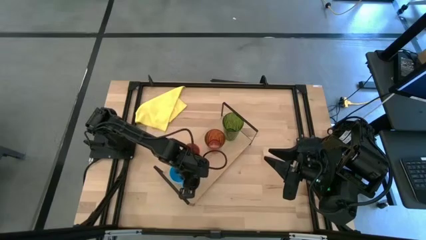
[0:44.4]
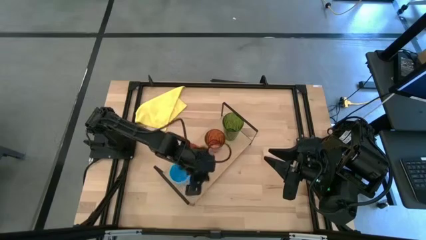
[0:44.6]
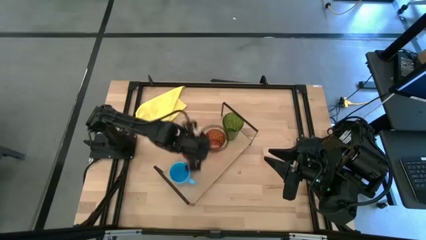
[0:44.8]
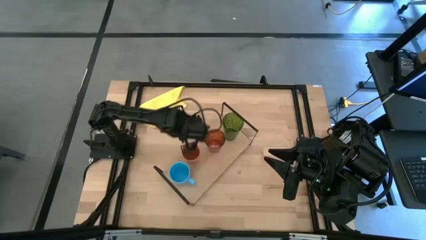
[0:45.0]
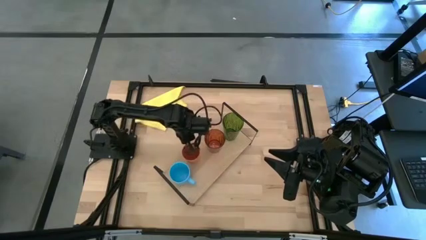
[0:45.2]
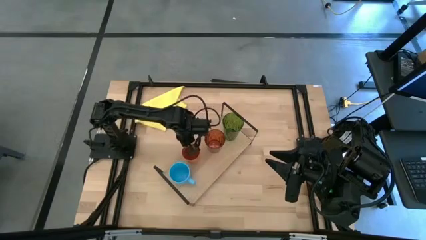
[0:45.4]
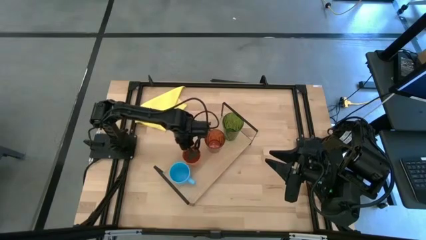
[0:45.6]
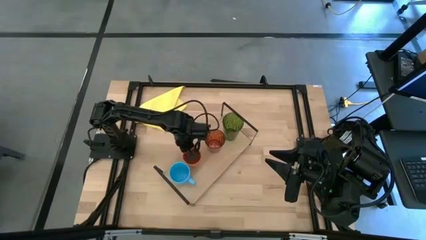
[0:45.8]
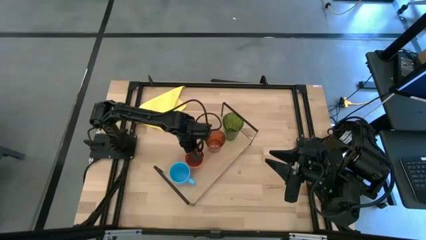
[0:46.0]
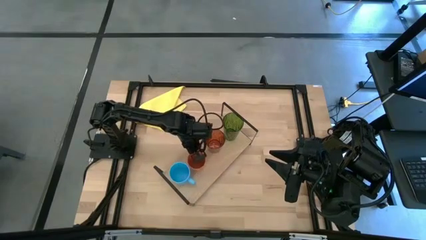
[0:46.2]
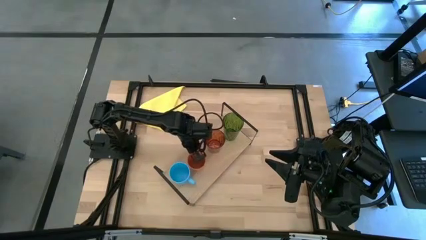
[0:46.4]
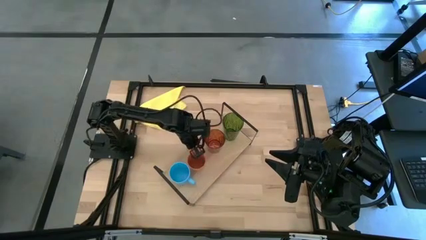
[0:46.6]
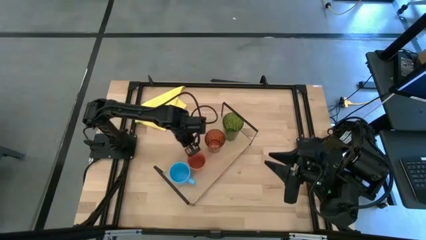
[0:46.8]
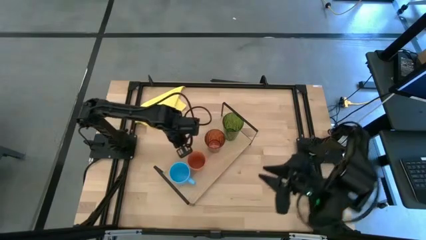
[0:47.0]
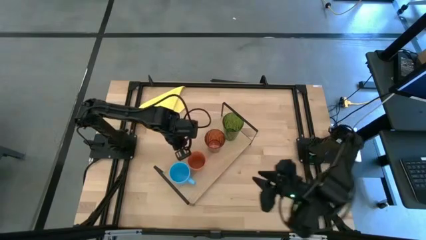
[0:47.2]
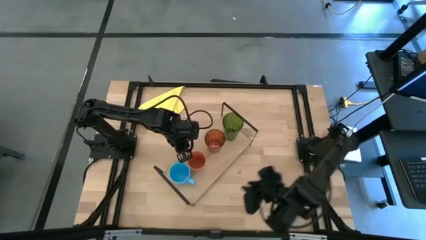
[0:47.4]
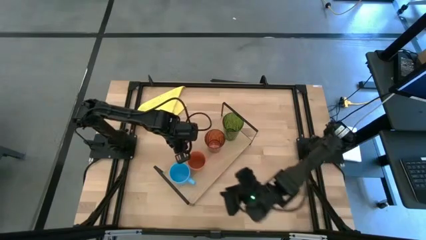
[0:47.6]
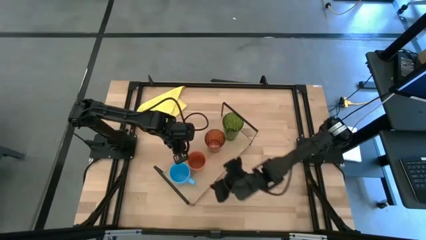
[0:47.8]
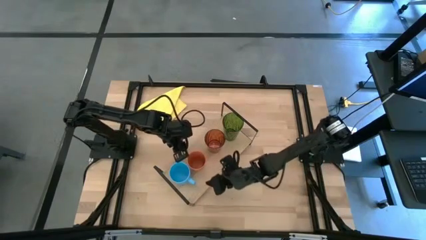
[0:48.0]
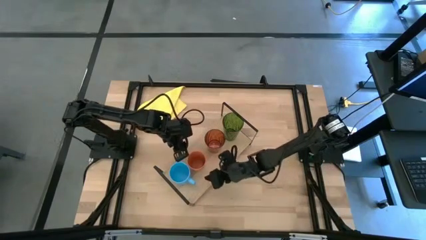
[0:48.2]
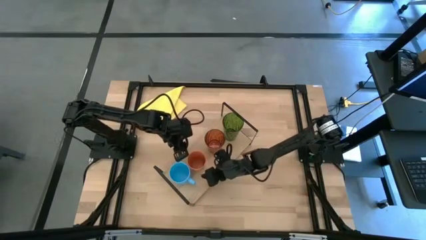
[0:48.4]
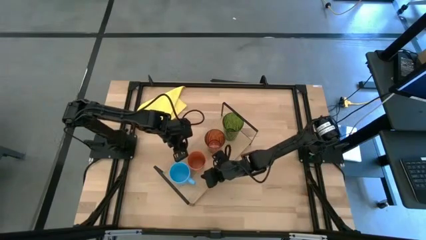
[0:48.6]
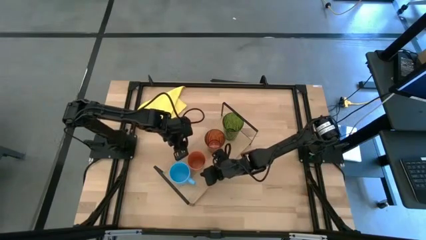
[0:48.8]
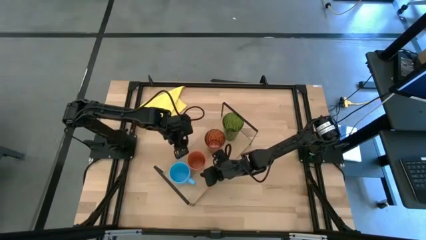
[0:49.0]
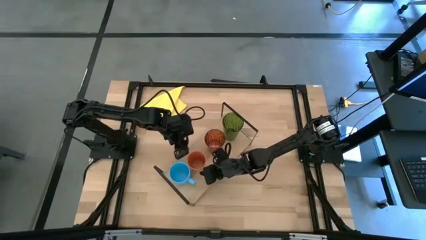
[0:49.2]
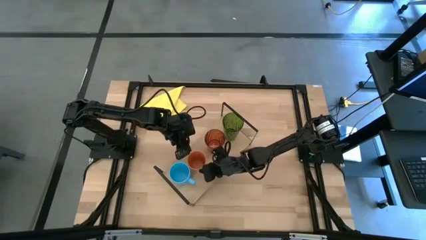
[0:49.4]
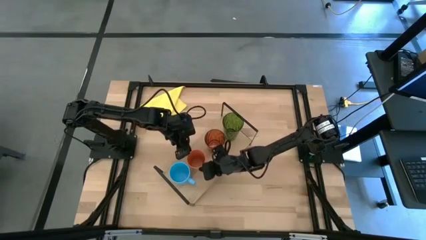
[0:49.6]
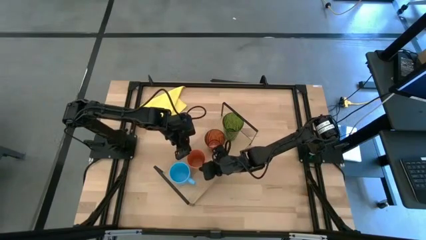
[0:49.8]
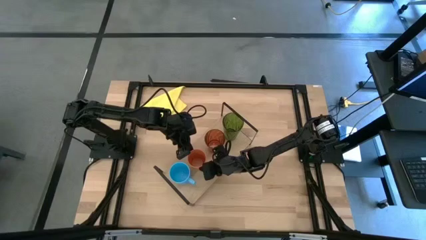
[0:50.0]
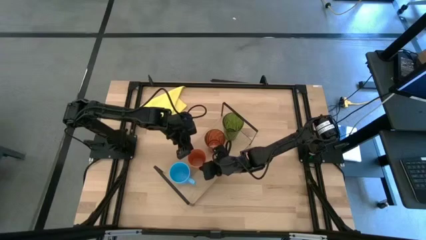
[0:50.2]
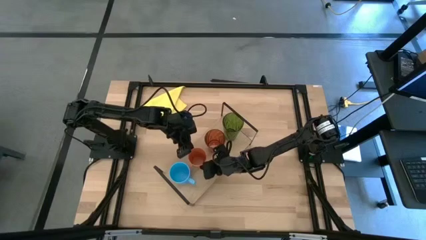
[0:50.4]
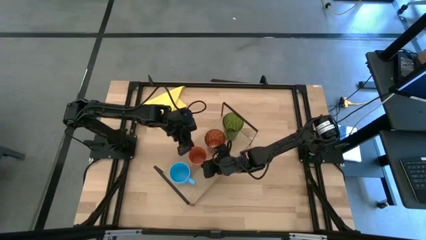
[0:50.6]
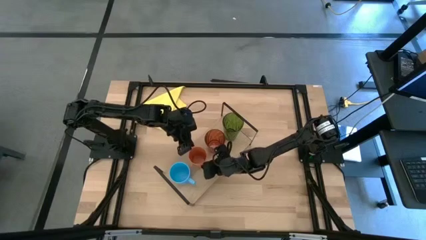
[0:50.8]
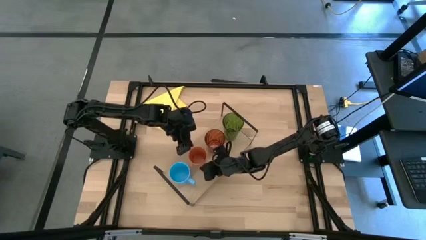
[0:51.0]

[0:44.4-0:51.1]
Task: Stack small to large cups/mugs on shelf
Adjust the orange cup on the shelf

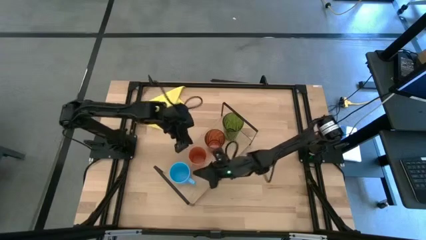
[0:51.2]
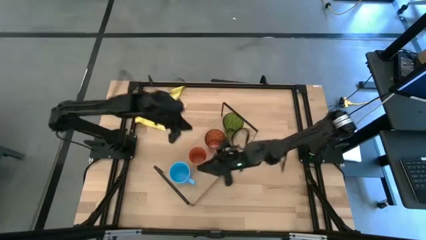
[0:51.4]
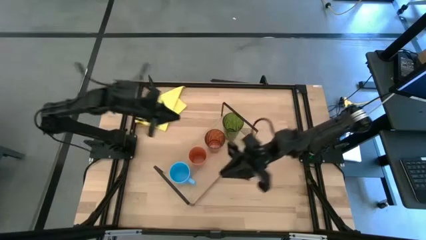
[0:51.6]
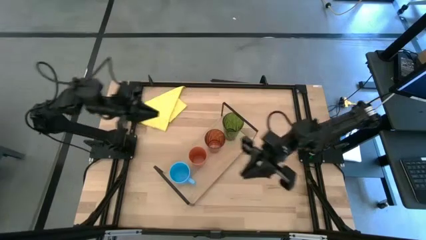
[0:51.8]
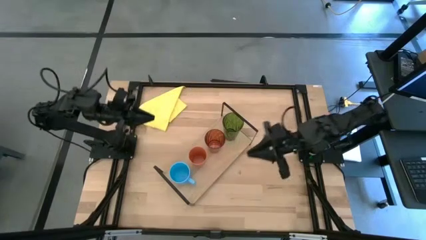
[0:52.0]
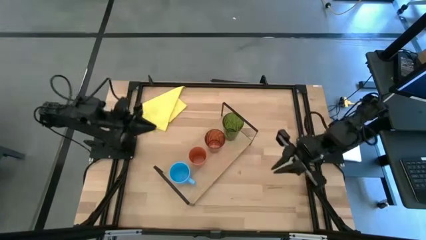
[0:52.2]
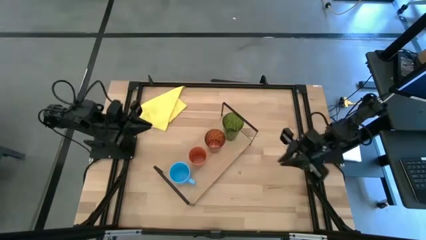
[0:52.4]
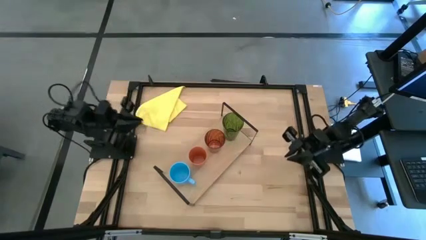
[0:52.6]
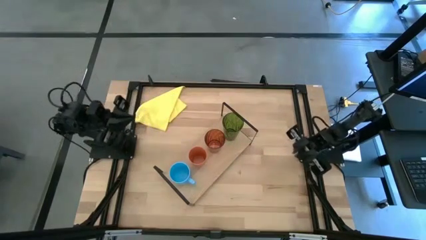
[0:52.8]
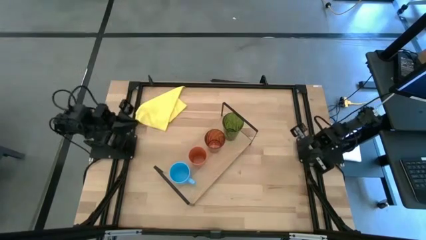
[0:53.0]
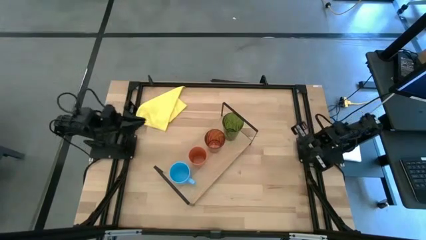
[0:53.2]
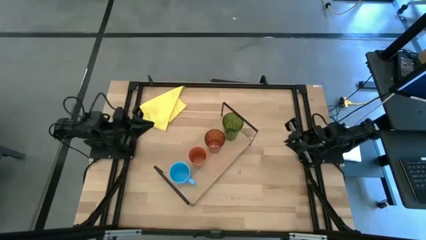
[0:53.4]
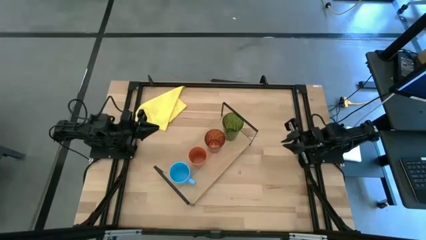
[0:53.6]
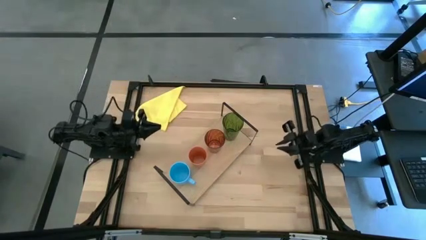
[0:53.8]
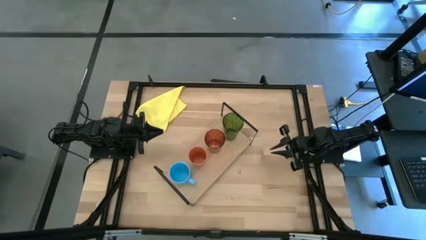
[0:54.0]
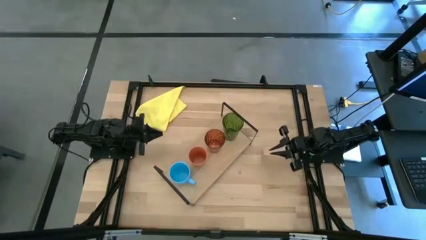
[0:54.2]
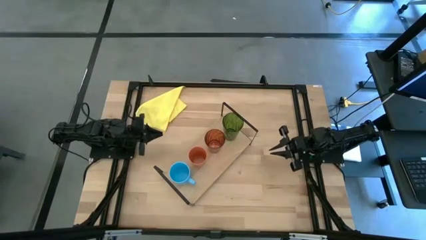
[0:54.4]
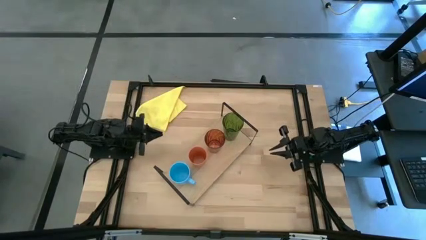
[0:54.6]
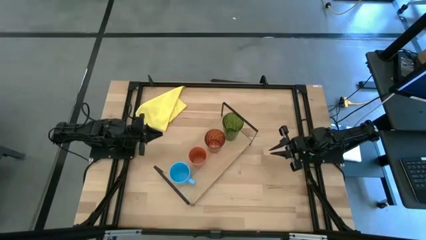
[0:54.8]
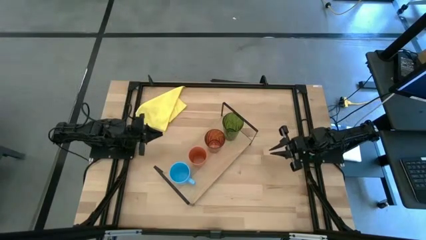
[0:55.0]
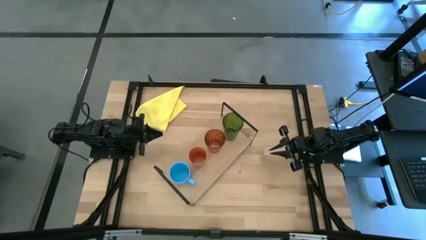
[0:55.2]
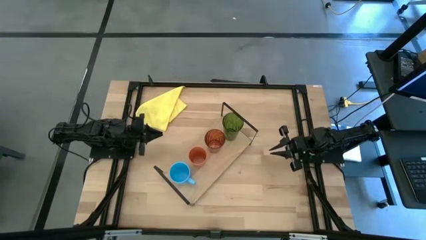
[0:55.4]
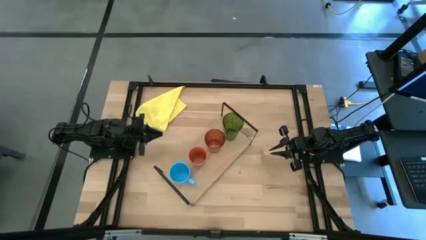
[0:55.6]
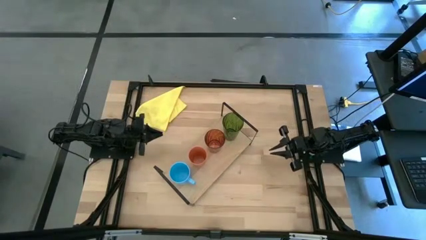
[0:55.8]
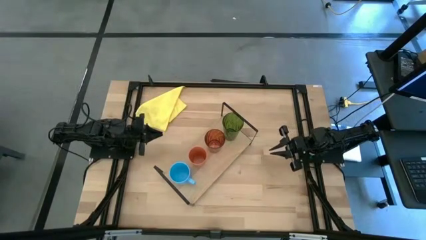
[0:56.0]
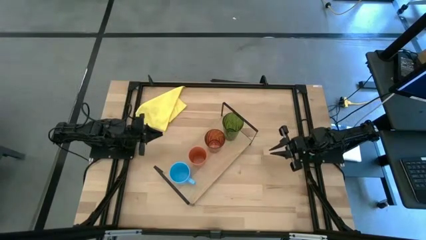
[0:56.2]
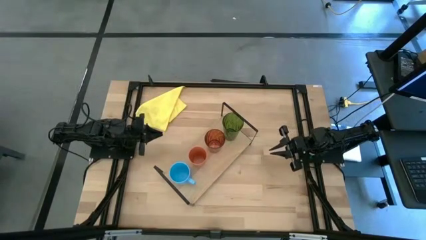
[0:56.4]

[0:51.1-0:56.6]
Return to Home Position

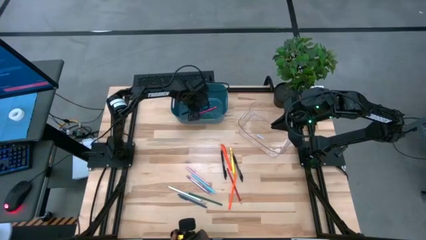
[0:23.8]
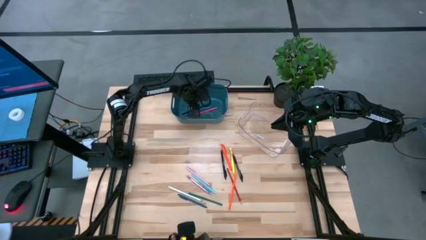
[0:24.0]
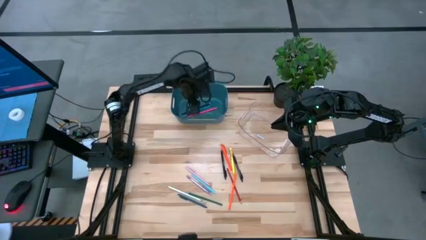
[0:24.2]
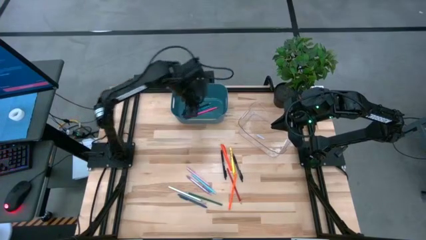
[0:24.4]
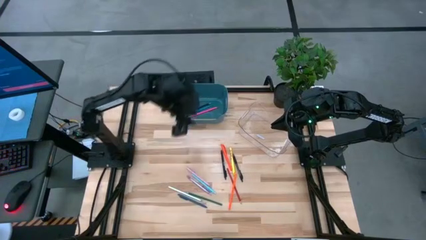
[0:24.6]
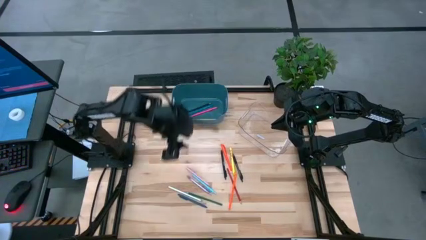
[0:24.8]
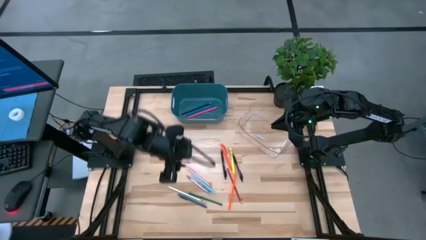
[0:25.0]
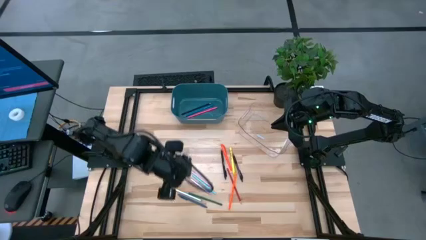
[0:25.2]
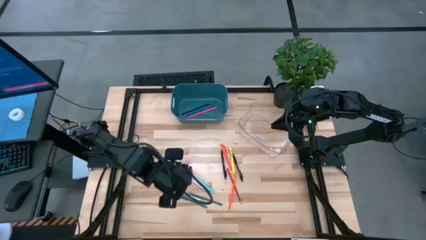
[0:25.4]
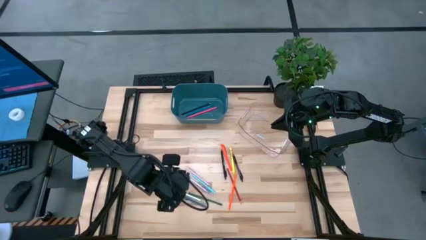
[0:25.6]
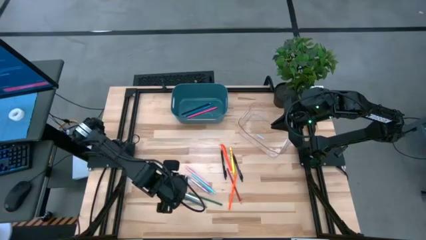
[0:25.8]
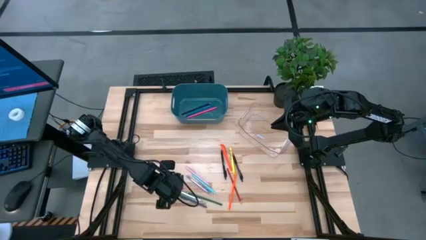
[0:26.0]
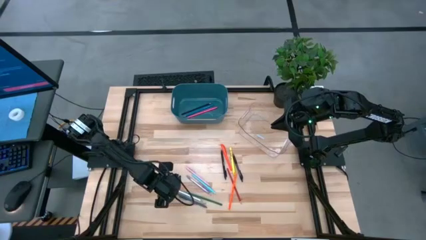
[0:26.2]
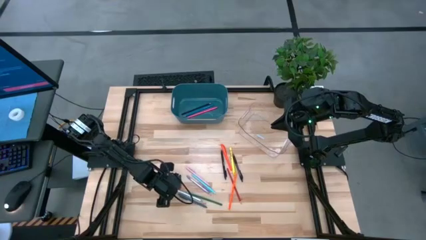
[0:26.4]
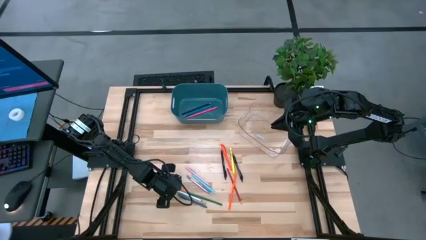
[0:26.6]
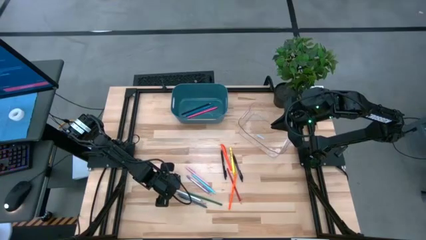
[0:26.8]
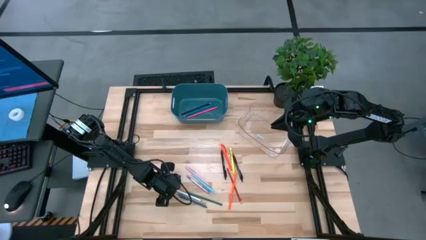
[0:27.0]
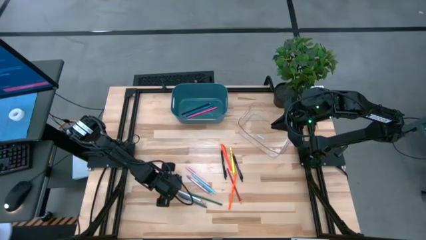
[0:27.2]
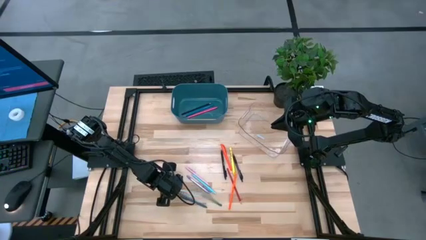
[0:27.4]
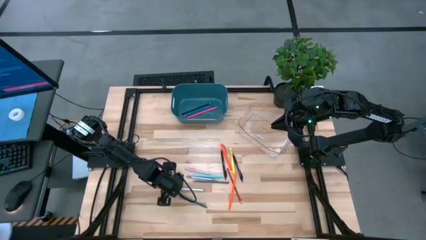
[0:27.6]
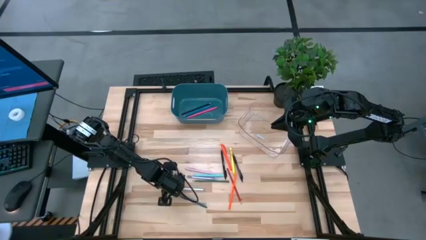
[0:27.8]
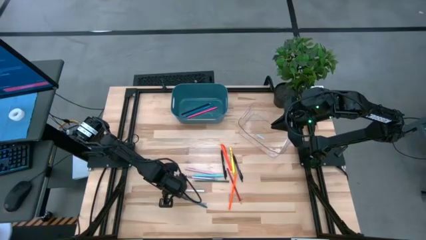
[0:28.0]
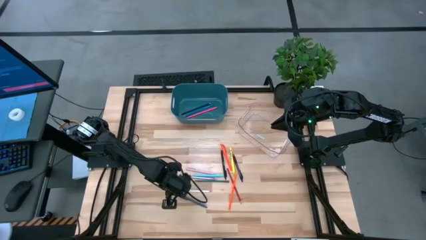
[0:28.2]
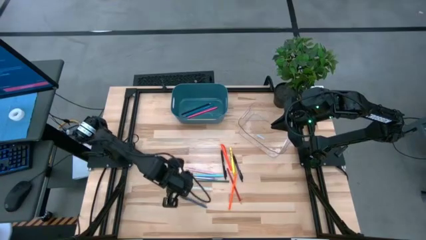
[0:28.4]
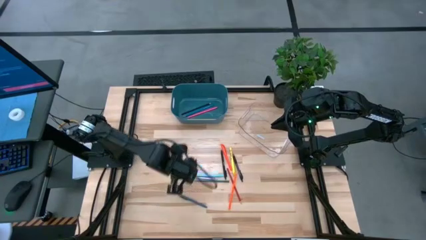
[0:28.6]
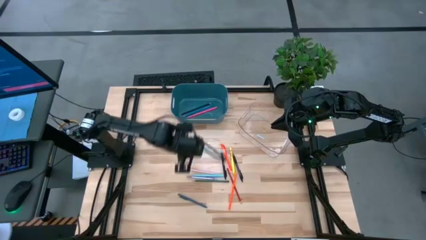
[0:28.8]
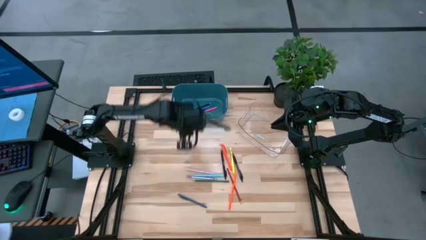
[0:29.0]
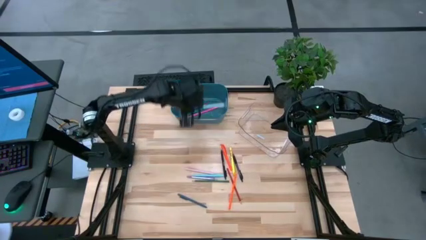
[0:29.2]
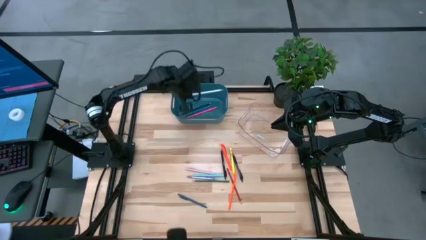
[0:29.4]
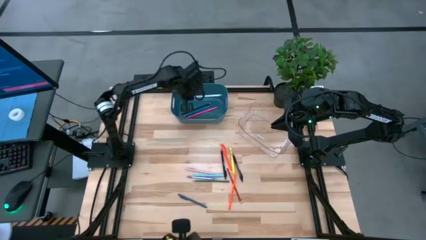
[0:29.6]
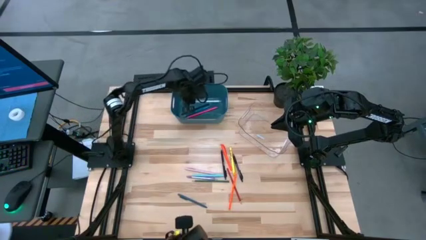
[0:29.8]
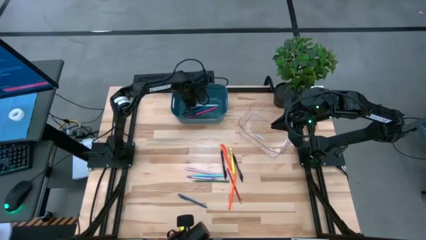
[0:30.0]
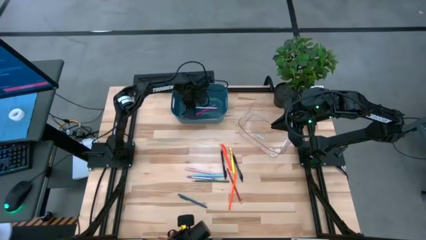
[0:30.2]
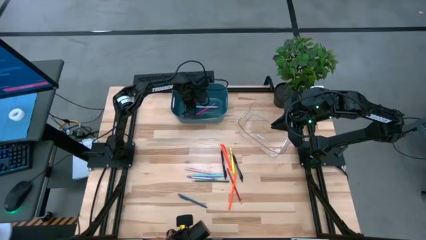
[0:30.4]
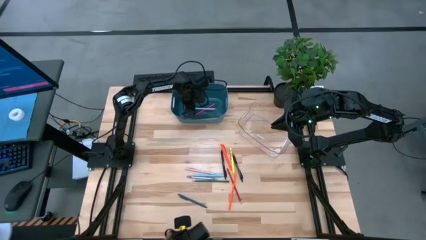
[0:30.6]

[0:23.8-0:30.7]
Task: Sort pens & pencils
Put the white pencil into the blue bin
